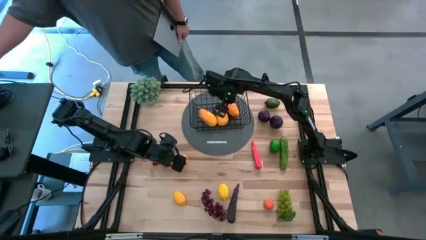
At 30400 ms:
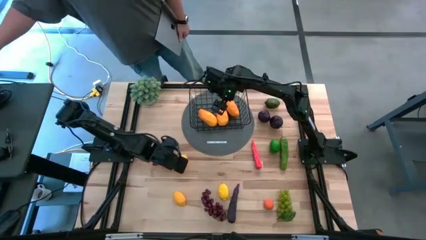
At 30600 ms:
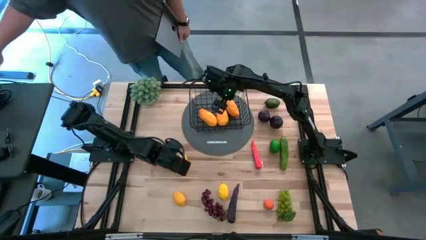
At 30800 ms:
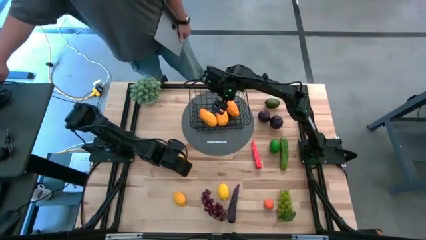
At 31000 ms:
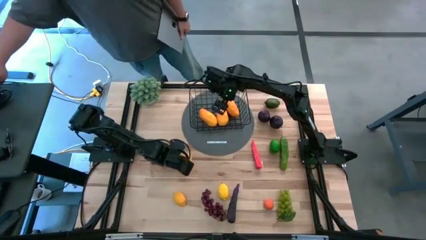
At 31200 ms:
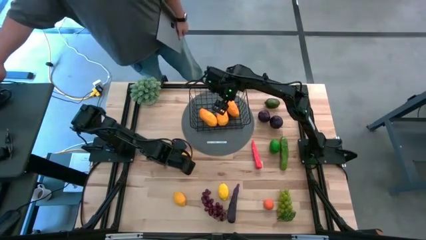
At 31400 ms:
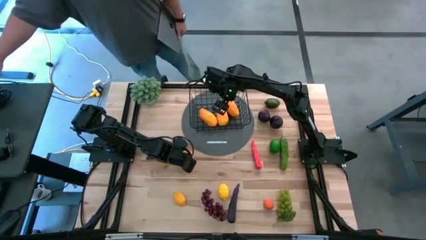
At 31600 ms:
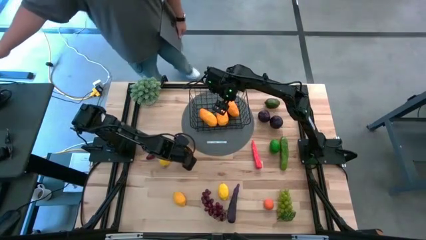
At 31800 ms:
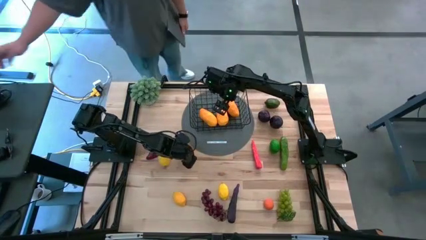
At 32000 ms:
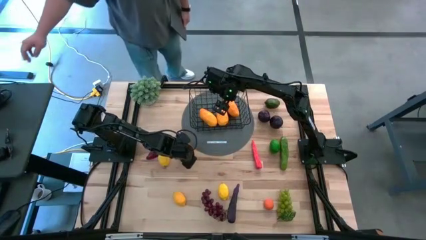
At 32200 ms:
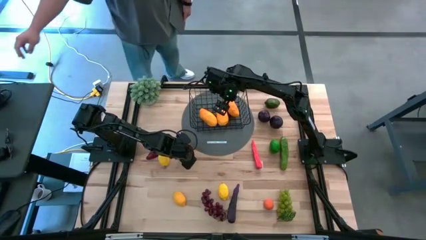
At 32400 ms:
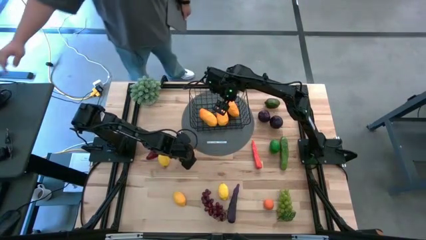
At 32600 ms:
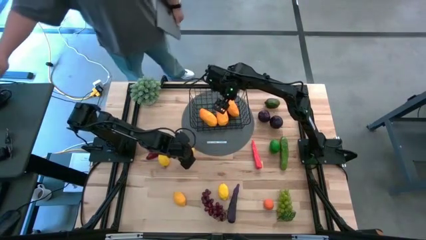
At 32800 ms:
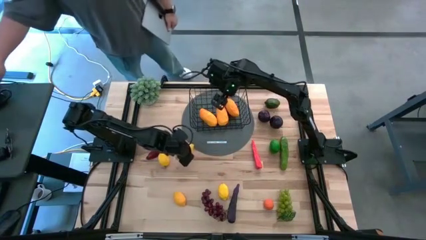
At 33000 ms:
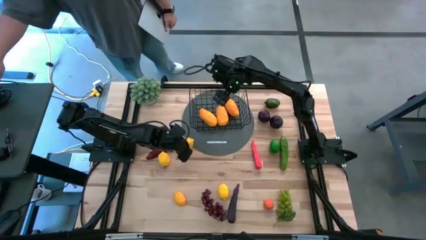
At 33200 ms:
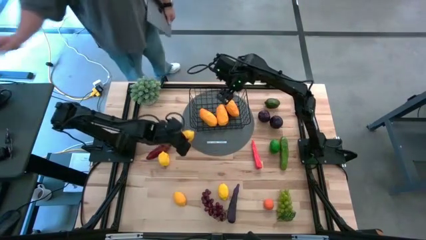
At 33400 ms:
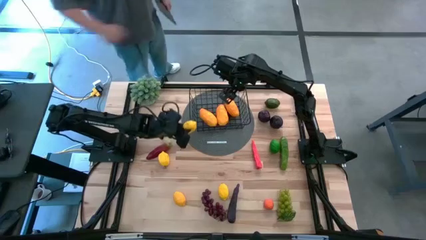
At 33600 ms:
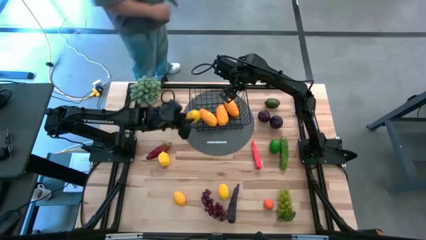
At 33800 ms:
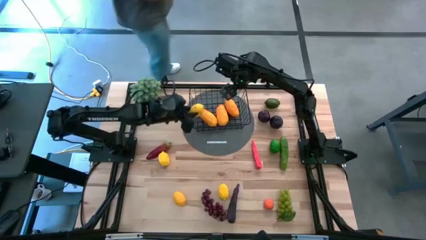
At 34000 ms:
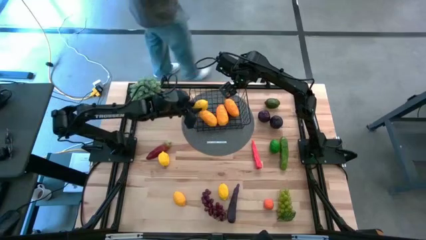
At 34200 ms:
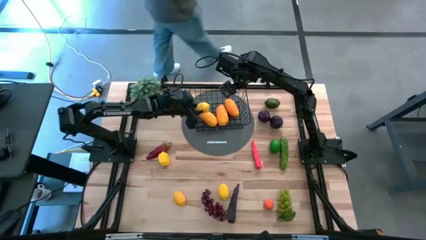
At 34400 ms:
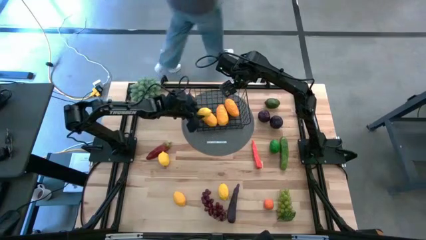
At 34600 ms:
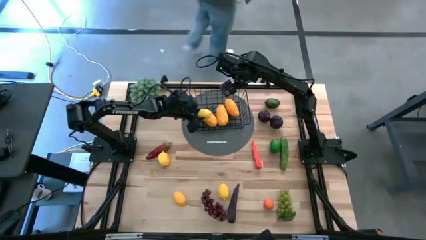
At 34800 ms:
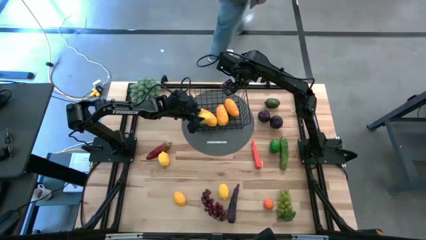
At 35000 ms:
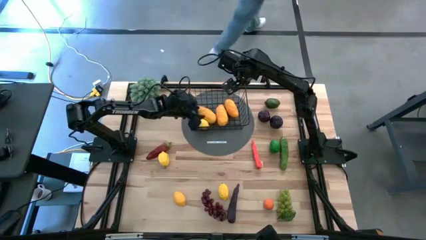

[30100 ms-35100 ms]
Task: Build produce basket
Put the middle left yellow lemon into the black wire basket

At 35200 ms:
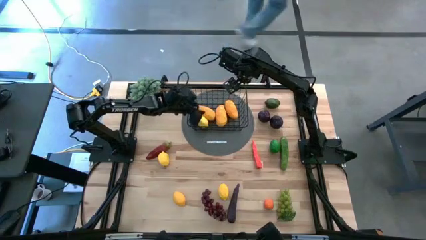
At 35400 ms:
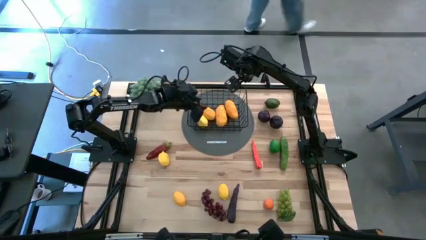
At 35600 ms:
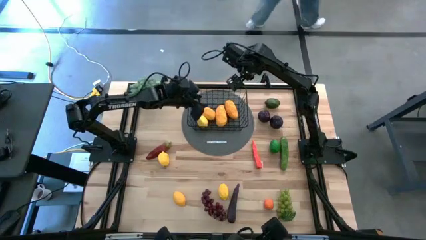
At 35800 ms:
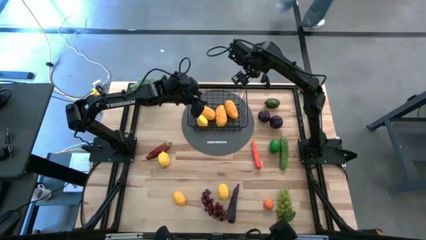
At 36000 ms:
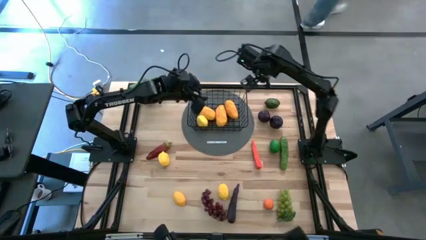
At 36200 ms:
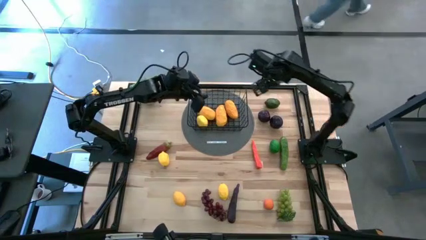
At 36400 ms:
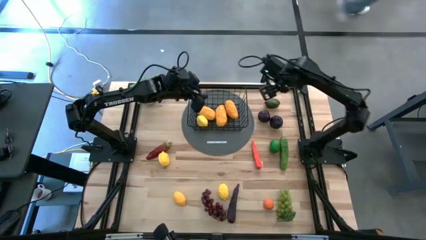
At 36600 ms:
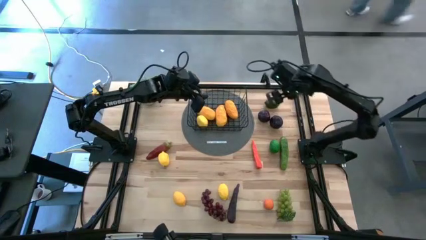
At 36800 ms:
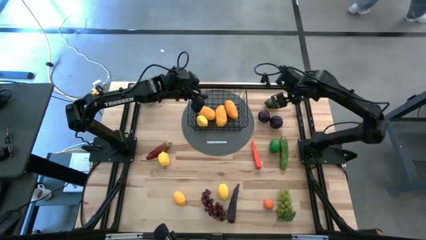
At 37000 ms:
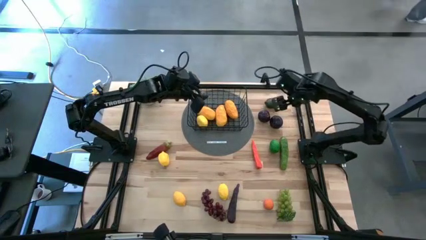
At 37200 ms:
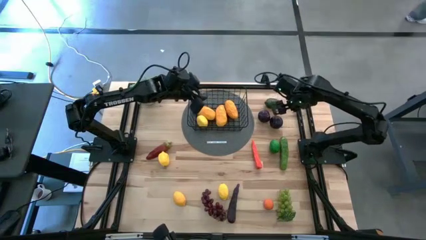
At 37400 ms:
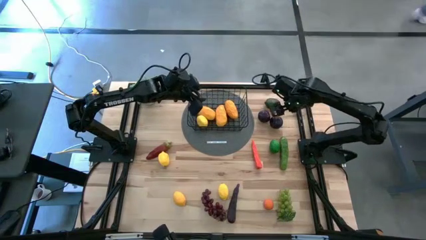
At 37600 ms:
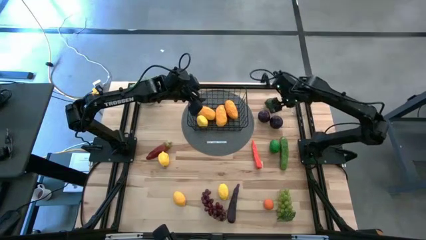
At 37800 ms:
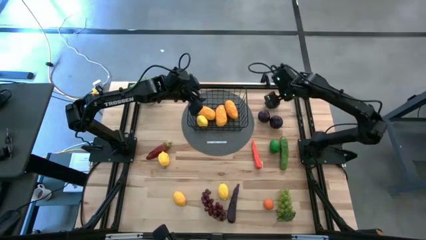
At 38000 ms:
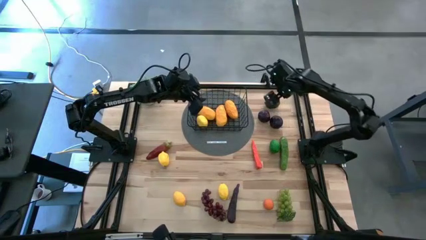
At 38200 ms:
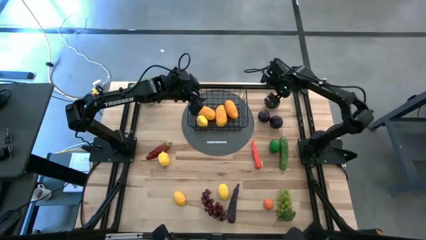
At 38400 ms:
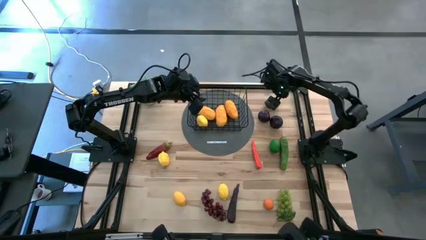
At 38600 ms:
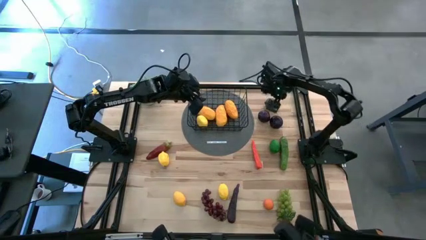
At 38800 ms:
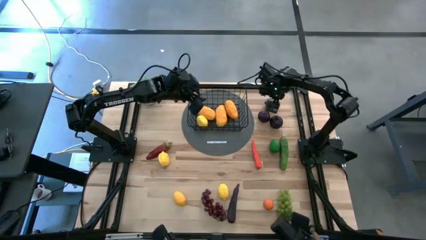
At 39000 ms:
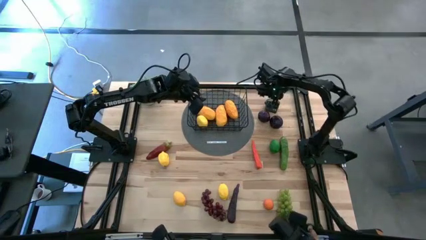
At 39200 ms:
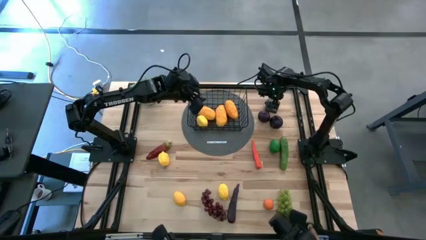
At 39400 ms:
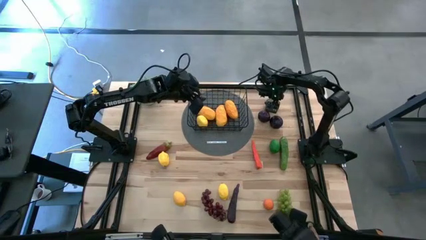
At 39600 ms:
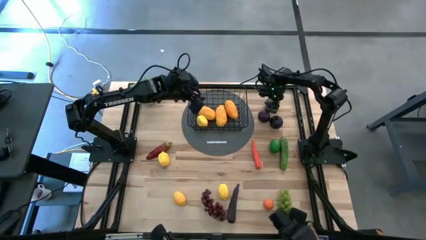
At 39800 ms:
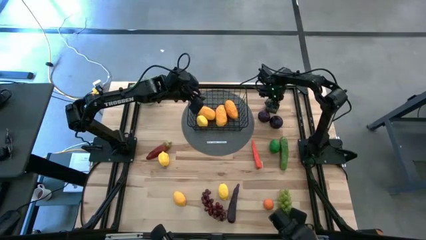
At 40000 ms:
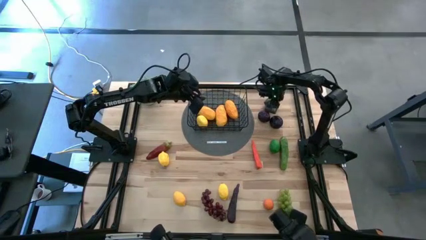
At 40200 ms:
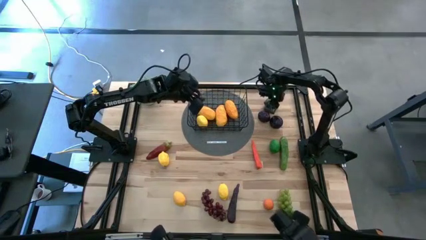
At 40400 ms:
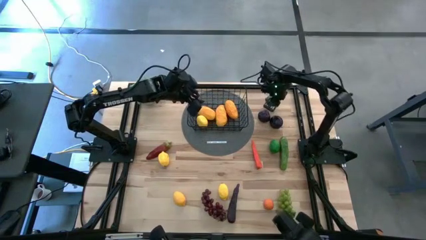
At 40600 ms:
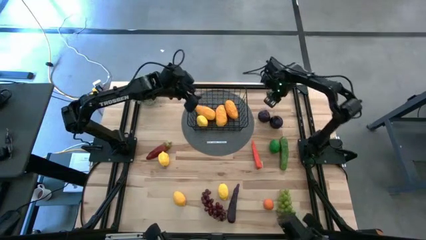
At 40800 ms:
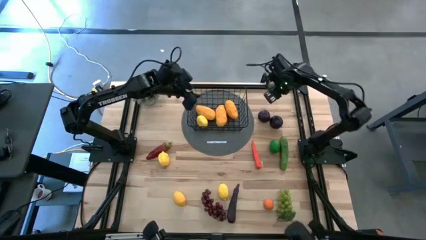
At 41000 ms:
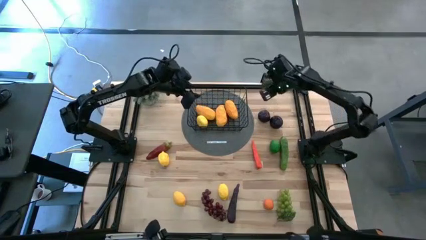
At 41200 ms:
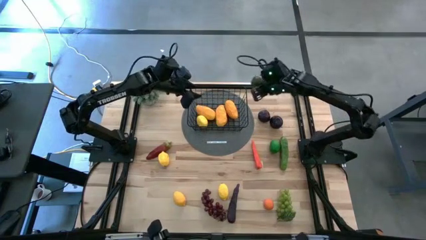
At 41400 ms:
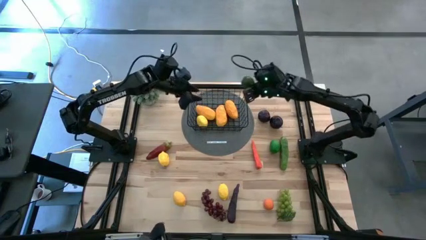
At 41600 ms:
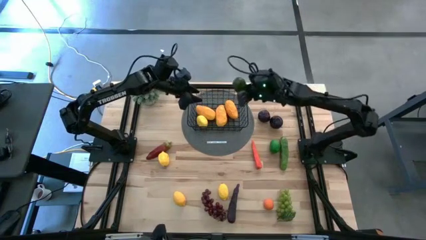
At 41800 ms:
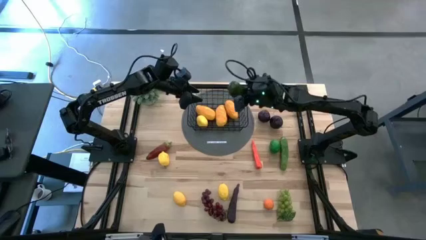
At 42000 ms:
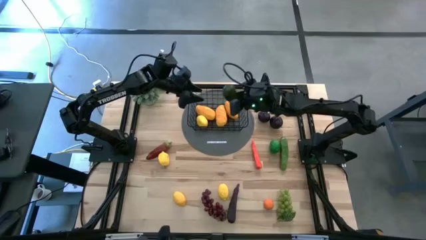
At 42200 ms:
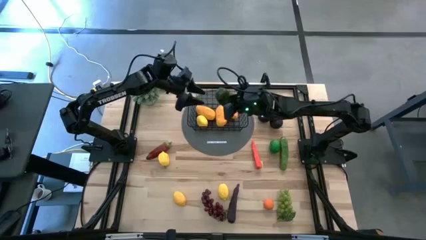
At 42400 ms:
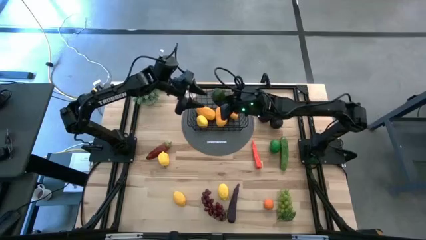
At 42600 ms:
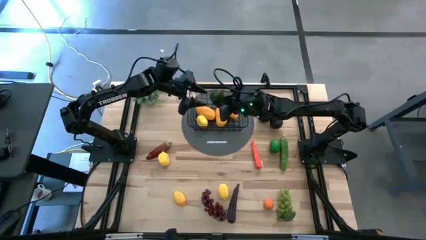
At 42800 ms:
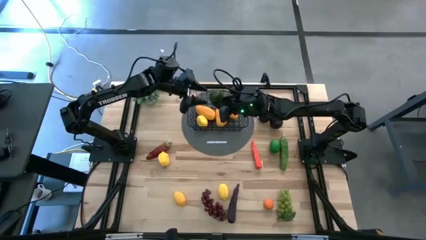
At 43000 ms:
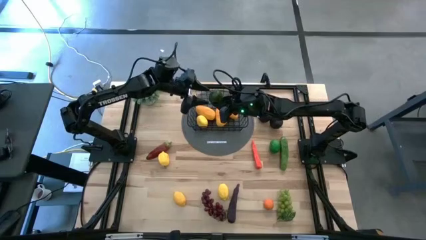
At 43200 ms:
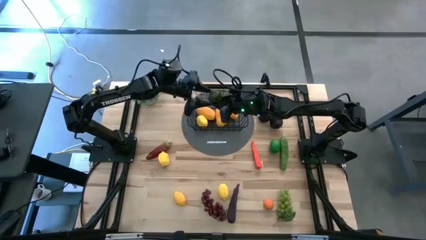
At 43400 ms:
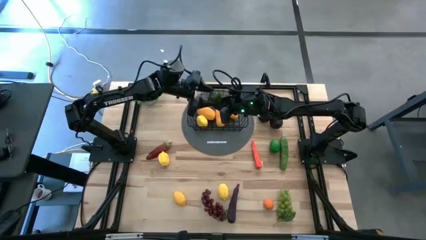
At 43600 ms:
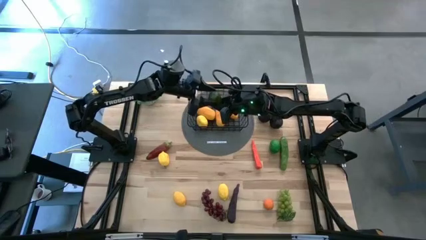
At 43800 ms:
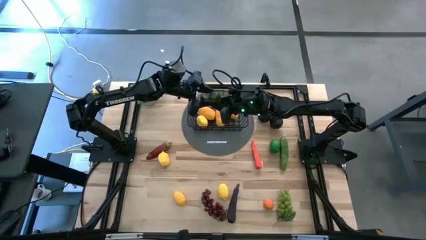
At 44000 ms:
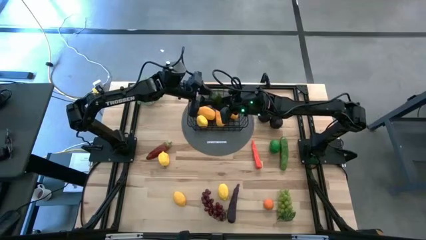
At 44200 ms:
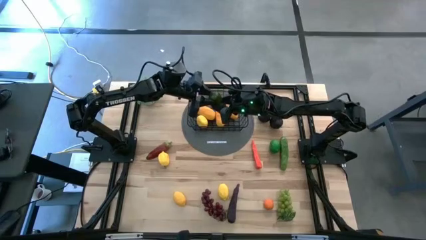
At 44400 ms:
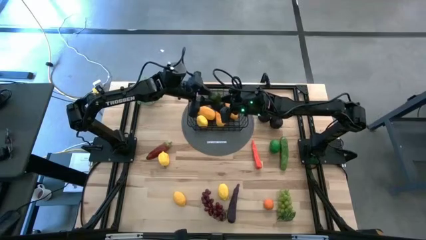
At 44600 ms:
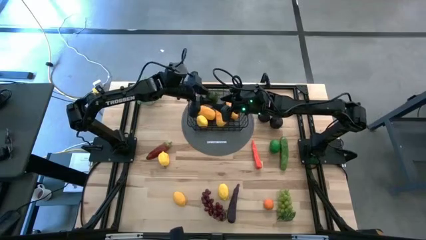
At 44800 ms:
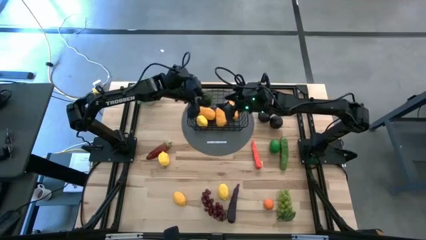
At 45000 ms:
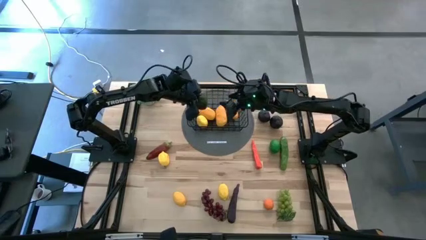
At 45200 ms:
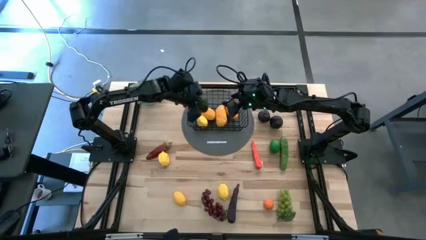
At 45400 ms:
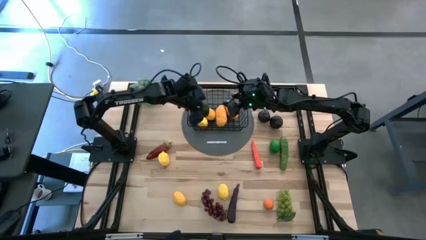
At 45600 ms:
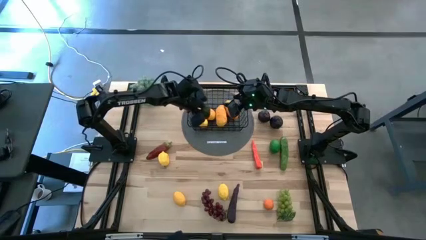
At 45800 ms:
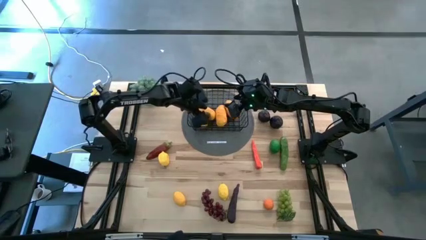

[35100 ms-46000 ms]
Put the top green lemon into the black wire basket
